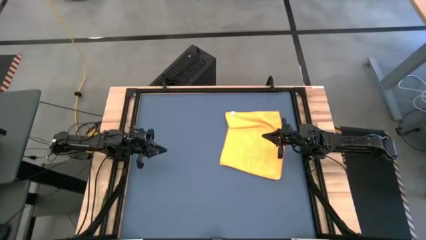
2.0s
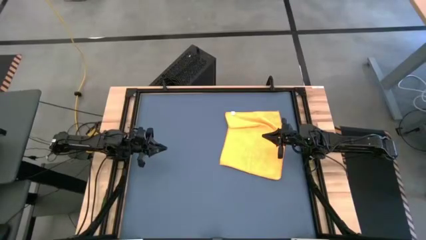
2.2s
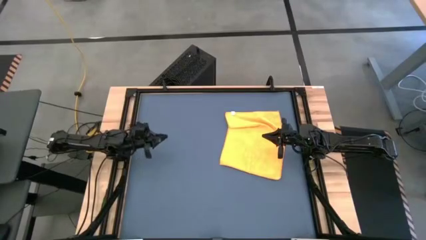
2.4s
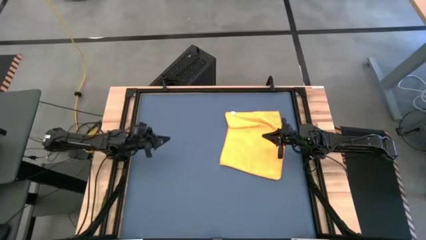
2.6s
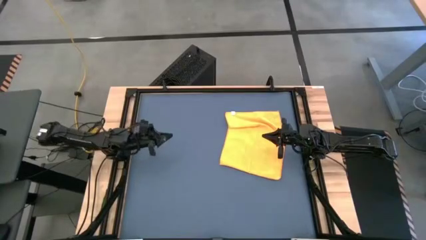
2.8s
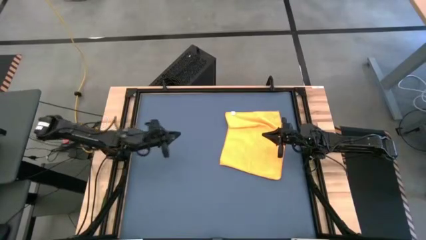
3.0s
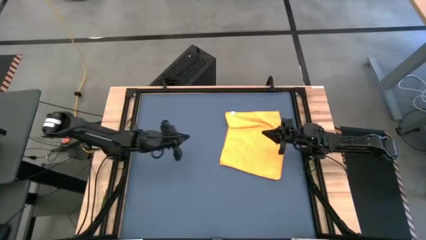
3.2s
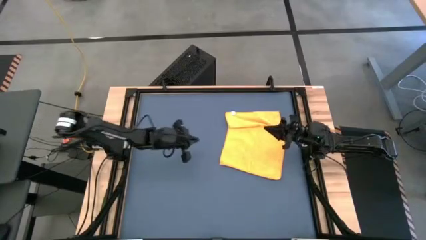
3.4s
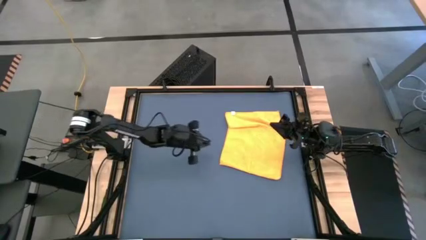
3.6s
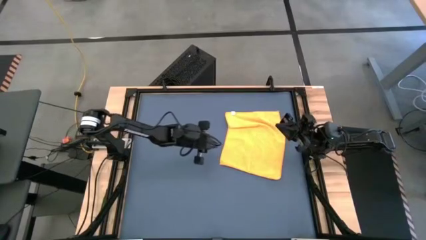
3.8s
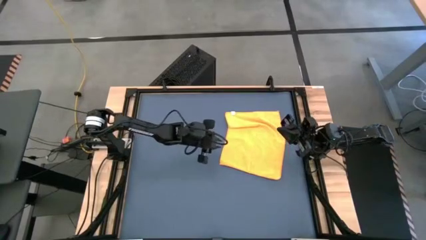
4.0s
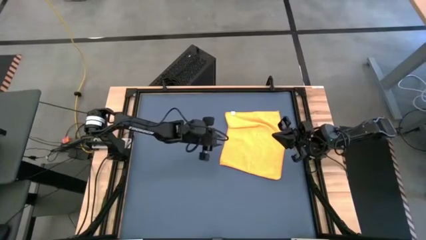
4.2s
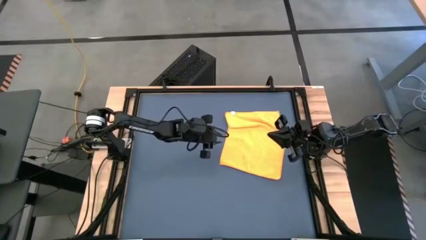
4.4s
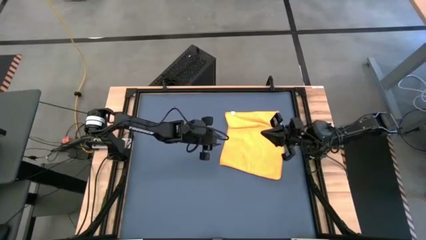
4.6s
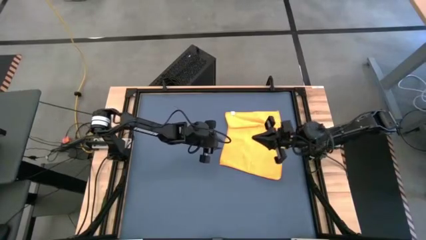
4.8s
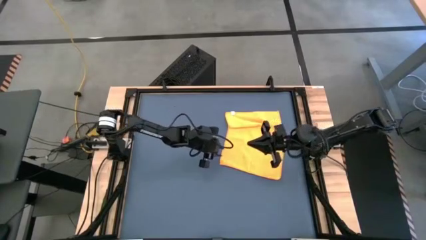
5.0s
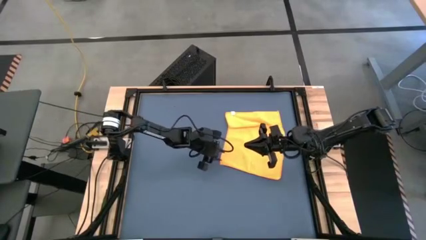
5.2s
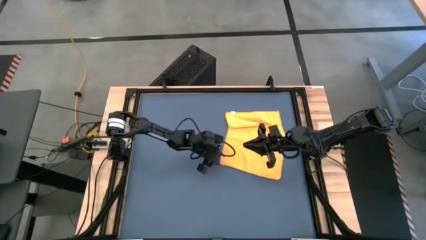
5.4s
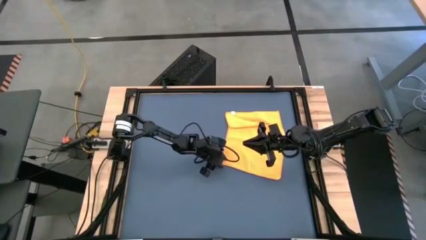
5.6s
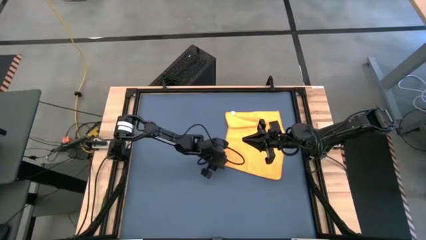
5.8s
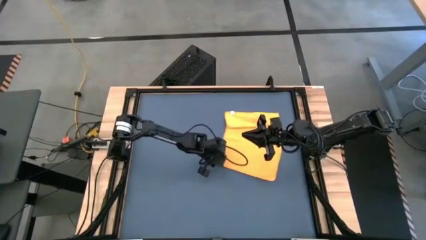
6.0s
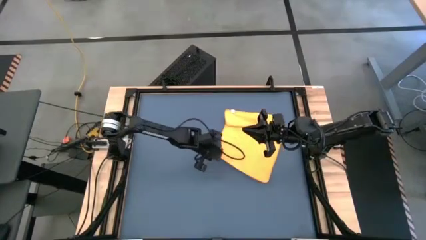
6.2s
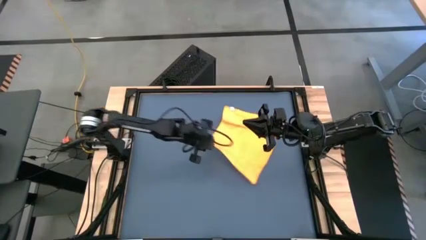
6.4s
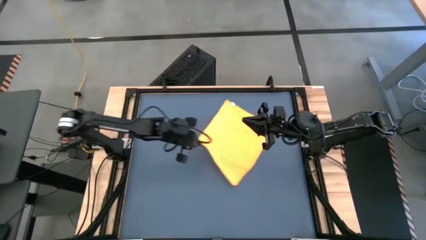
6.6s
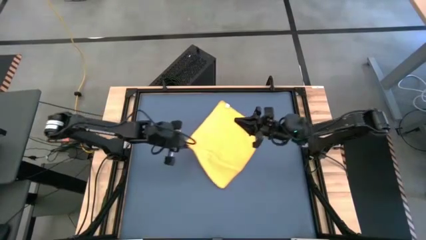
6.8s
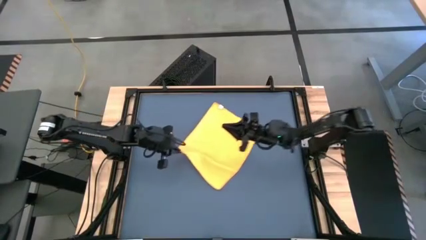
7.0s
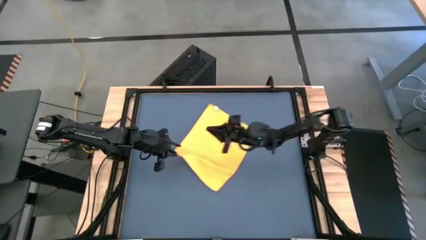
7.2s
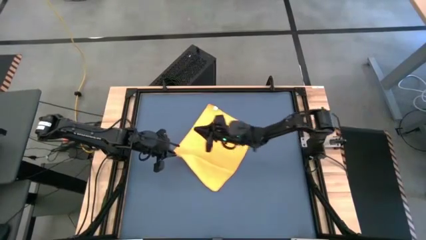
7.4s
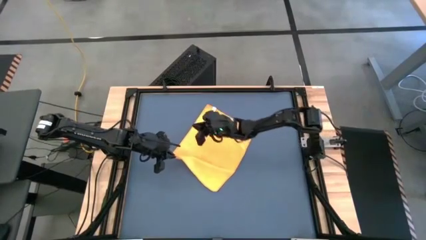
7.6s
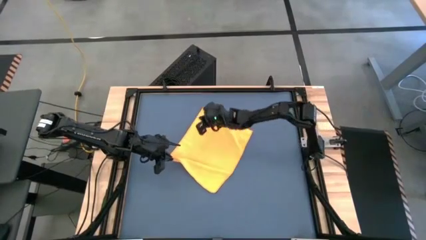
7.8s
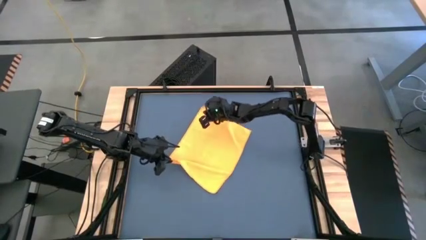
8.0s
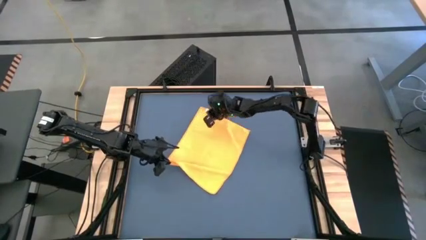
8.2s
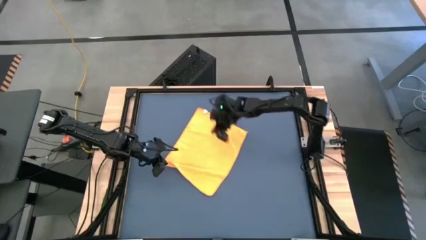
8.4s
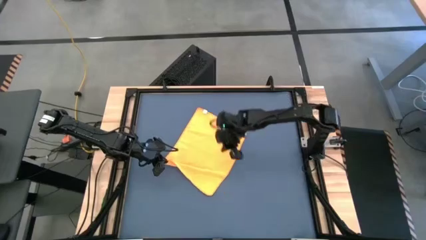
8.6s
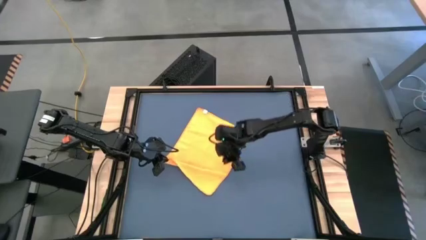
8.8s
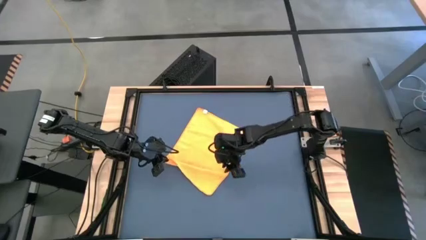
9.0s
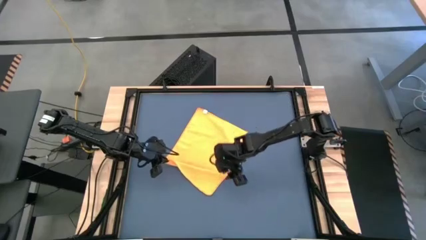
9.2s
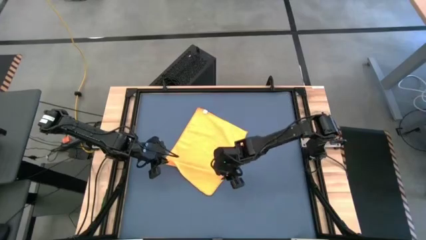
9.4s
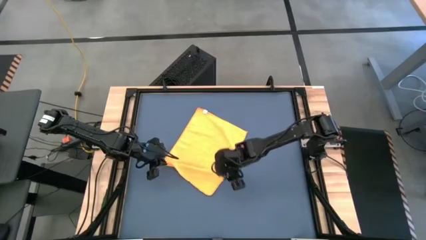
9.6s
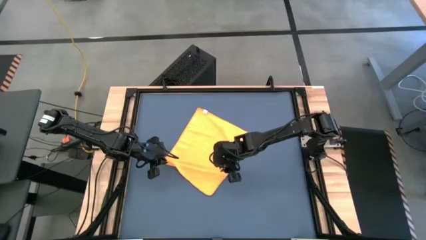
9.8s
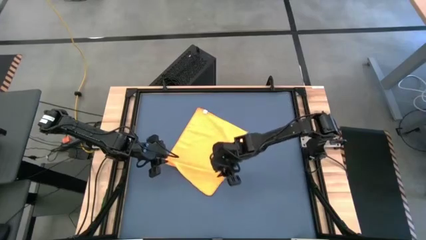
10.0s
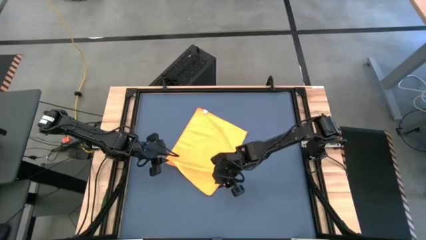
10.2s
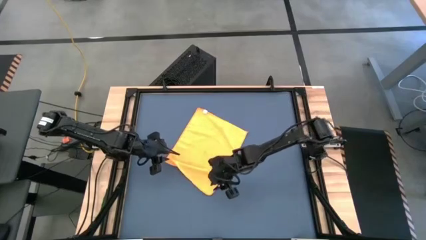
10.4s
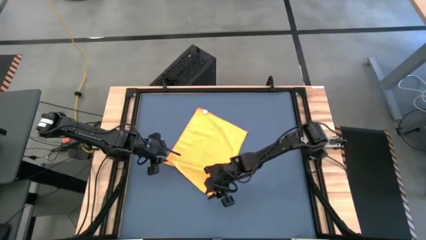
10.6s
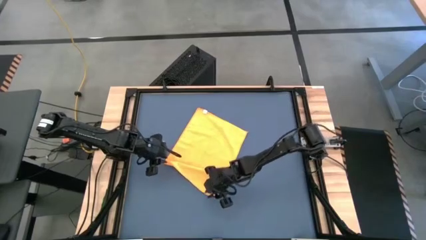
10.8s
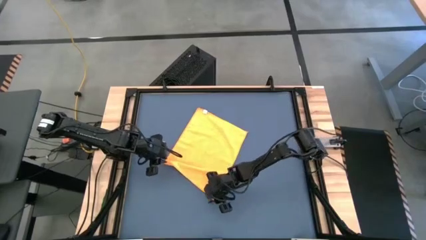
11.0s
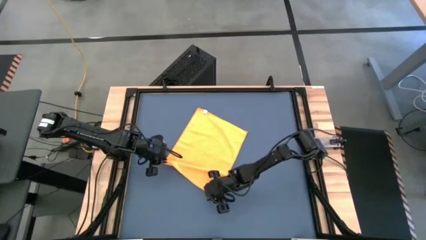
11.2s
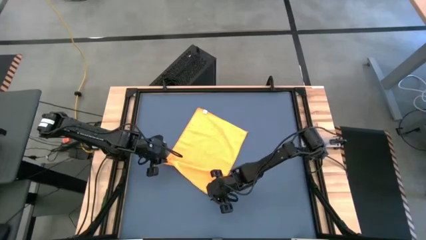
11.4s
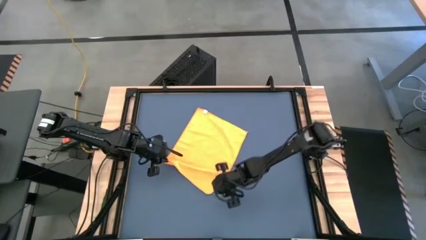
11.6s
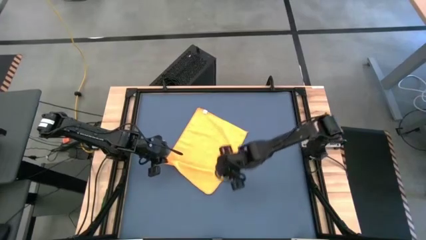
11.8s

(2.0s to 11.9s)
Task: Roll towel
Fold the yellow towel
